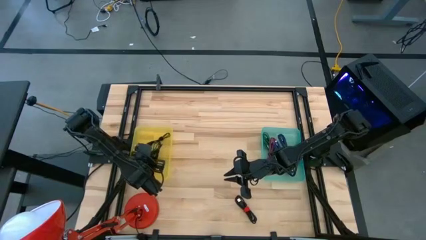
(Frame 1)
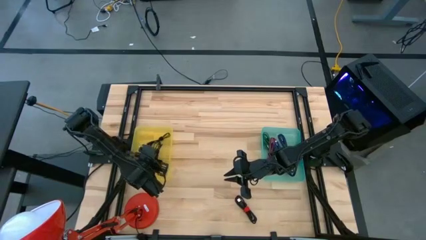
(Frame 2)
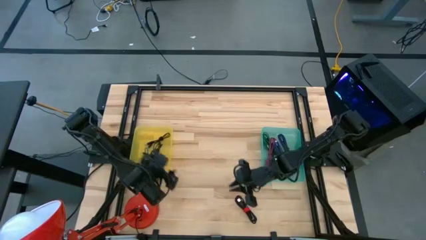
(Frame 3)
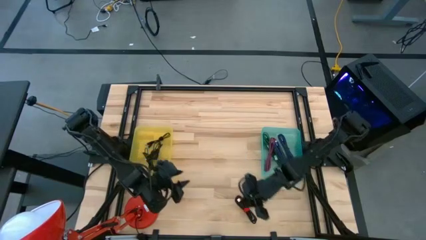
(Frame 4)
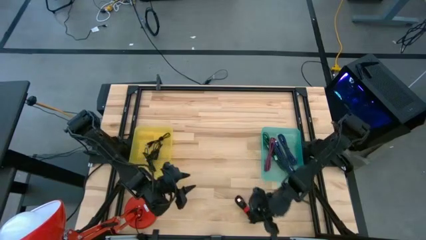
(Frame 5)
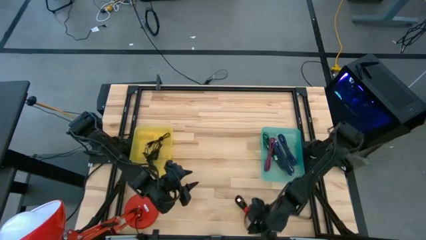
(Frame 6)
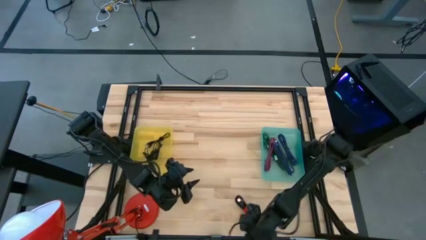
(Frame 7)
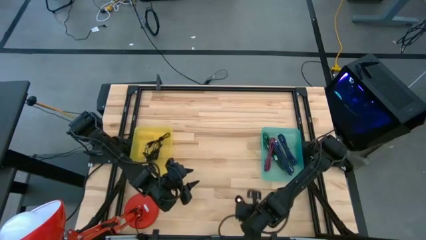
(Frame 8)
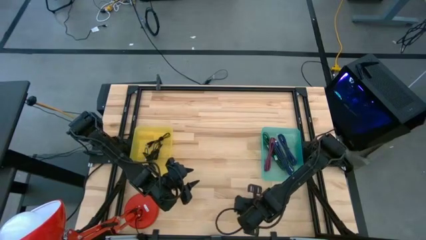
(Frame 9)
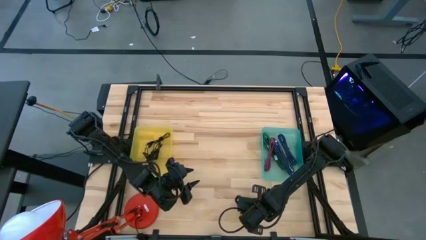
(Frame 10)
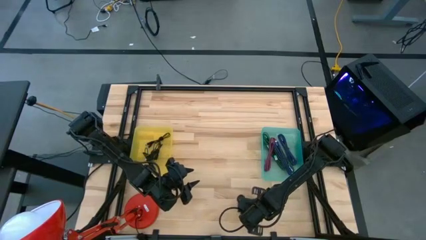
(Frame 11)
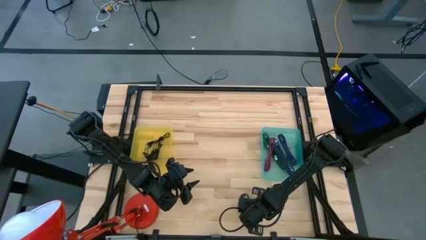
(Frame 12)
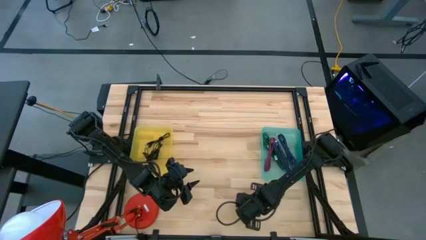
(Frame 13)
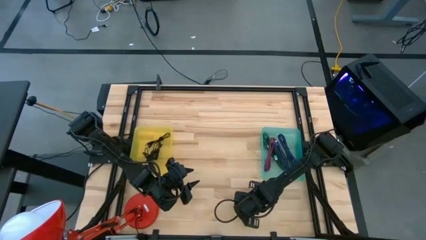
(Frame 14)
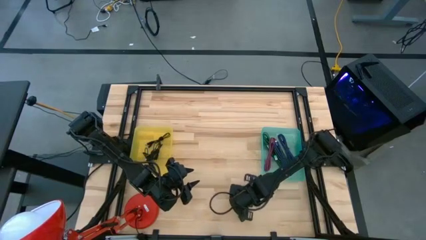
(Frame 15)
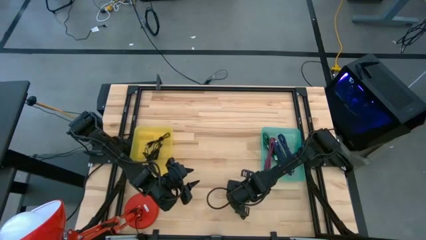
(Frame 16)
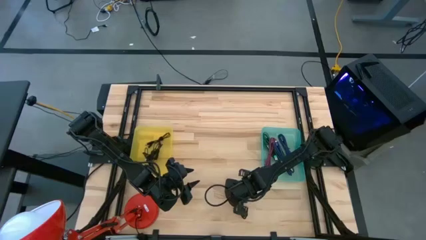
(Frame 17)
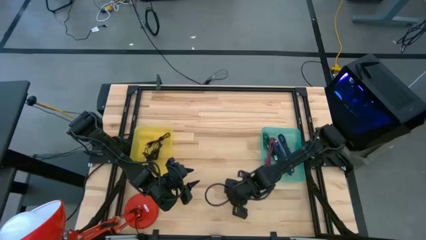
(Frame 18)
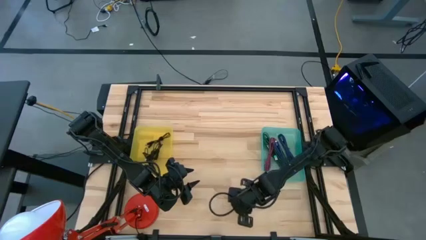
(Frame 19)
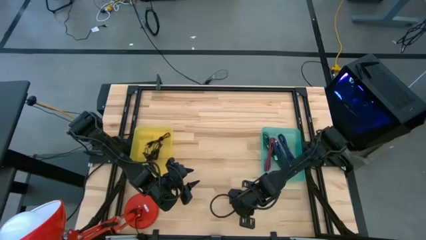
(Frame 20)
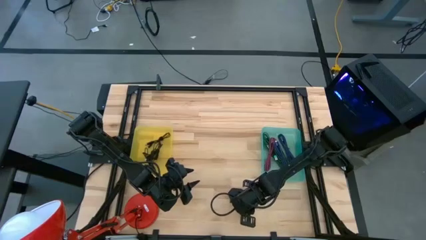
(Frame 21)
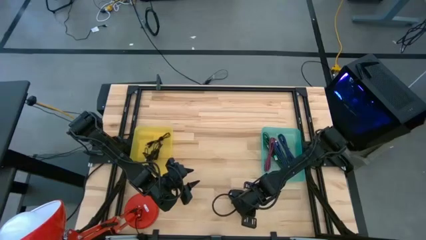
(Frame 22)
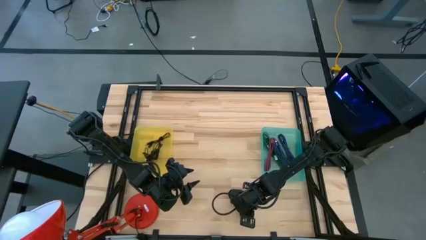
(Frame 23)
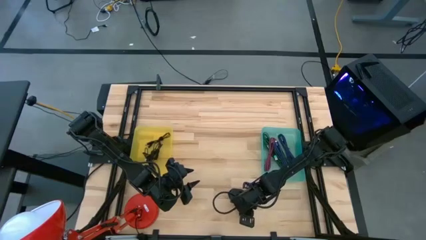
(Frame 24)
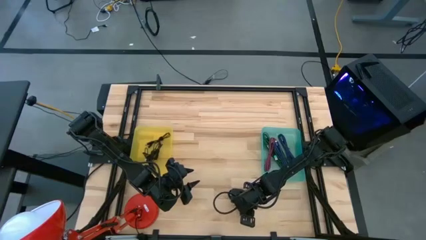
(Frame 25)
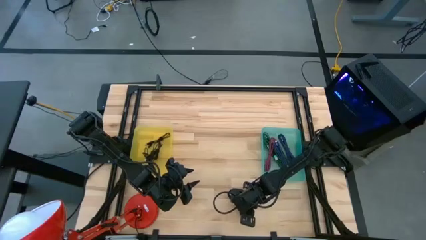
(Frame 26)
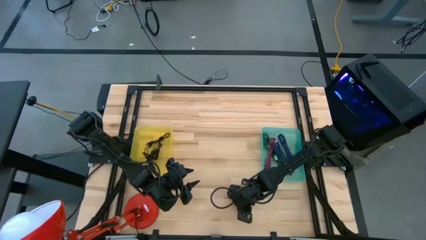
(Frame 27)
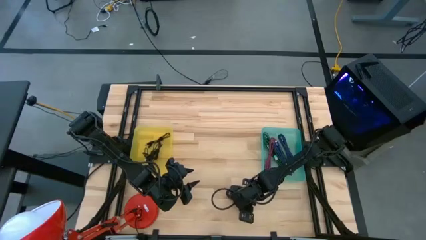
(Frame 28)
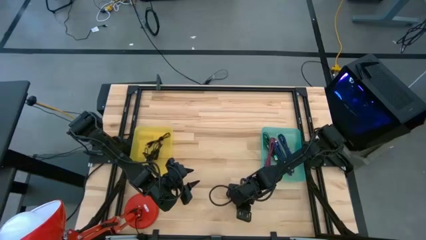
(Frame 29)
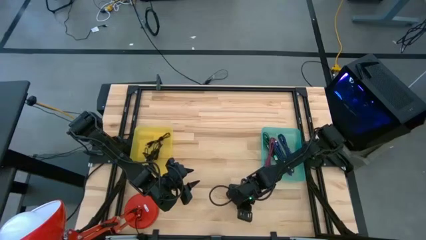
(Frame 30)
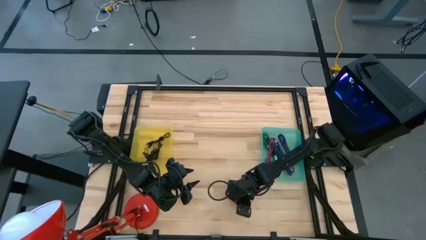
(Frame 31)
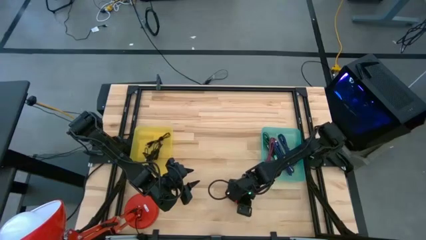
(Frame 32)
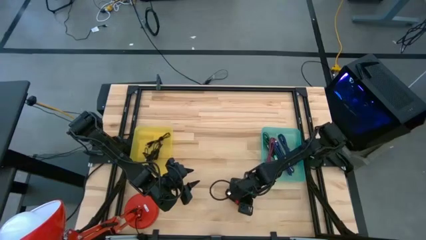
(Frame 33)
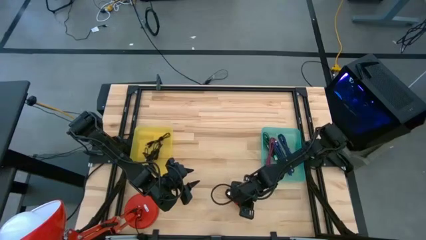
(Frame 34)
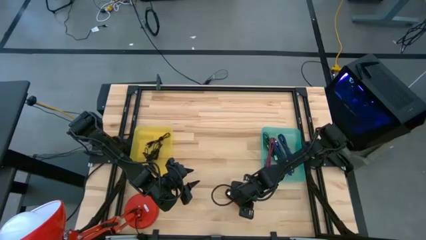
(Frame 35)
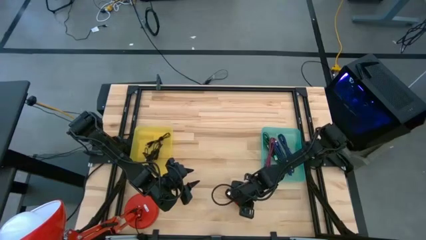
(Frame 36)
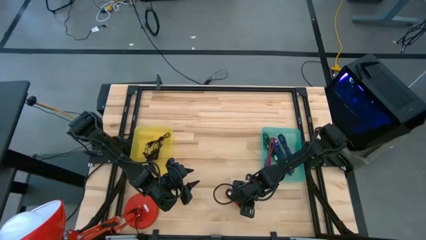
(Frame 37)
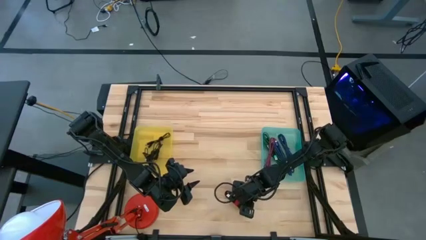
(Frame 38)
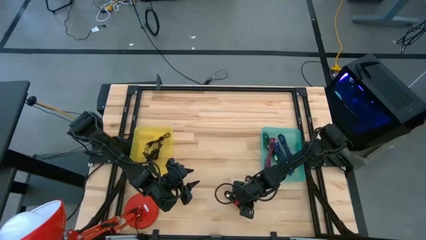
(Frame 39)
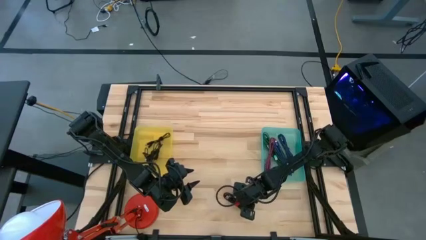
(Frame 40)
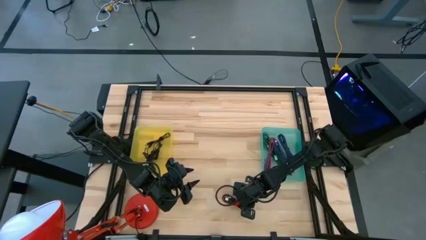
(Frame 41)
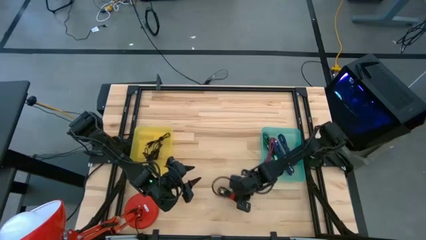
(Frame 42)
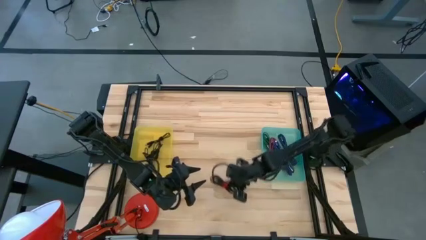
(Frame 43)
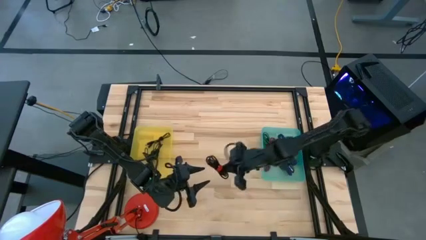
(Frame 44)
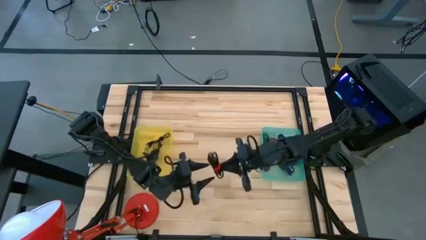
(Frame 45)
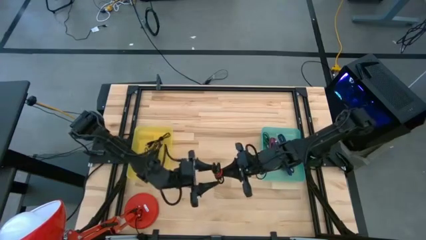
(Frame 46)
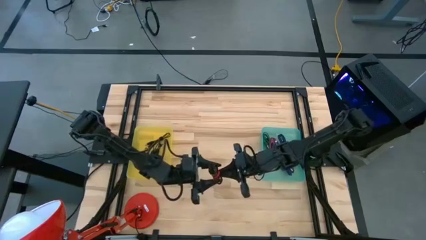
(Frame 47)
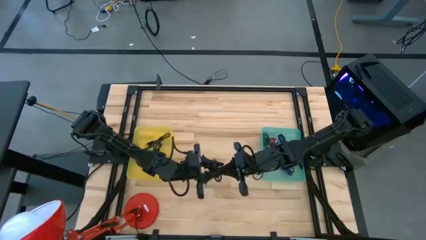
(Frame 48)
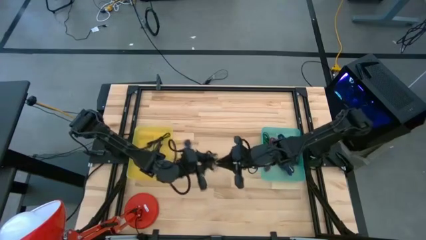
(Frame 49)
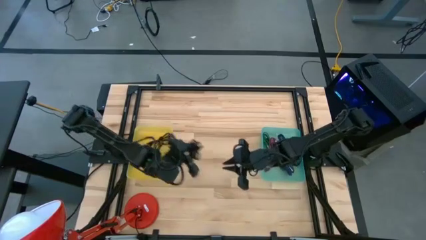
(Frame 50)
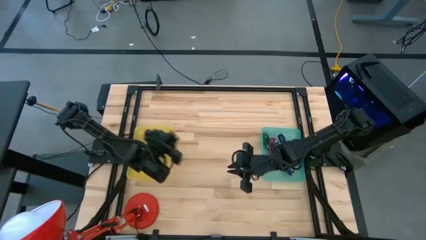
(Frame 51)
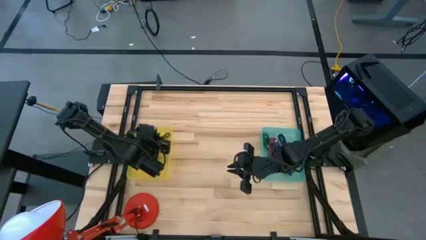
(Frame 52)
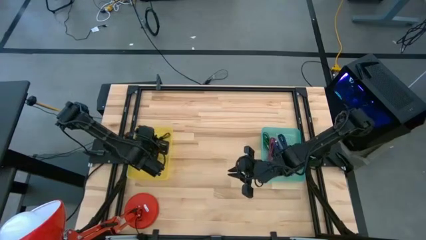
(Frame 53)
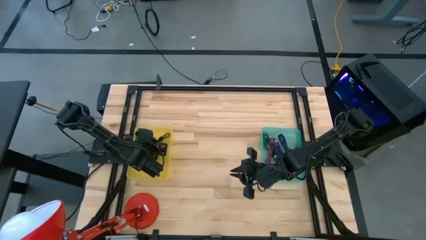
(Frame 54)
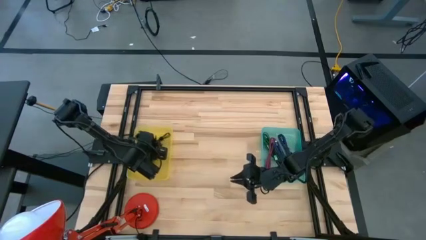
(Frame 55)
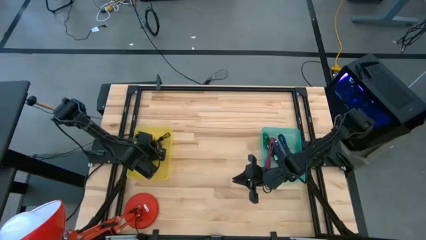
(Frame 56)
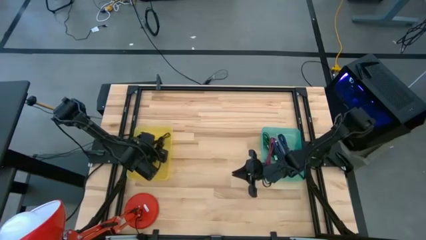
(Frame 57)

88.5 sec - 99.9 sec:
Task: Pick & Place USB Port
Put the black charger cable into the yellow bin

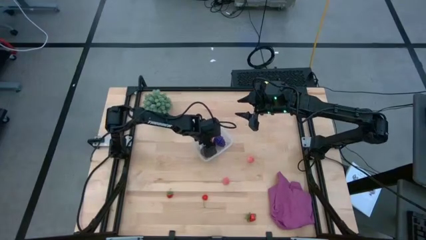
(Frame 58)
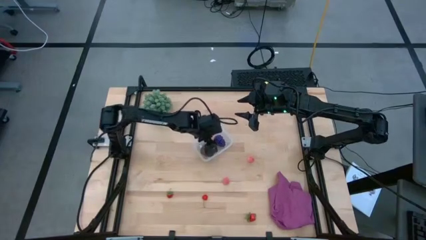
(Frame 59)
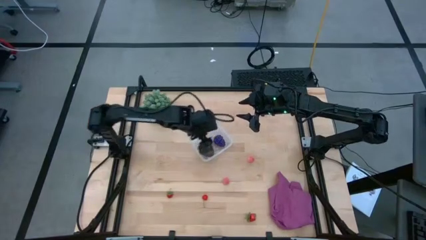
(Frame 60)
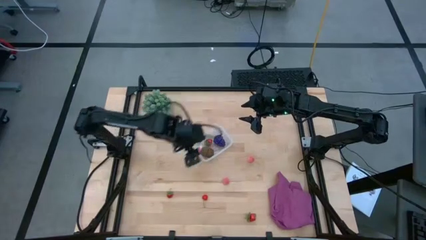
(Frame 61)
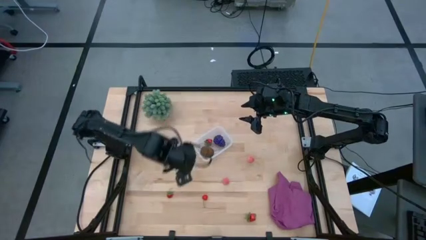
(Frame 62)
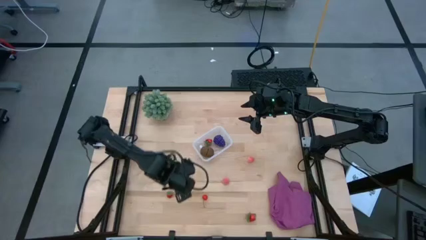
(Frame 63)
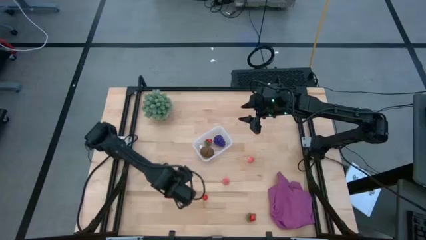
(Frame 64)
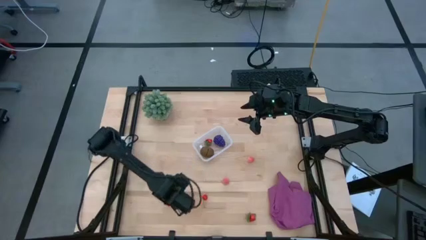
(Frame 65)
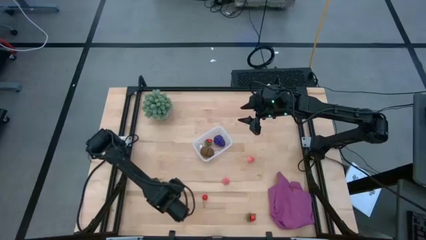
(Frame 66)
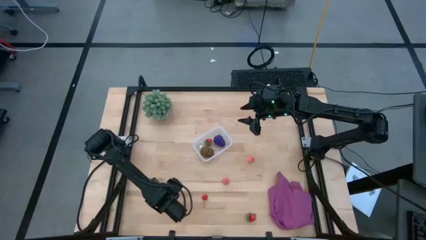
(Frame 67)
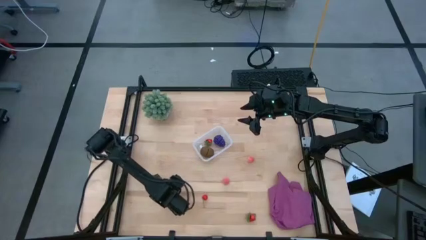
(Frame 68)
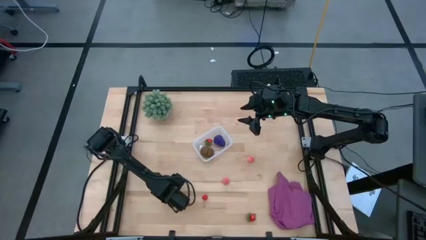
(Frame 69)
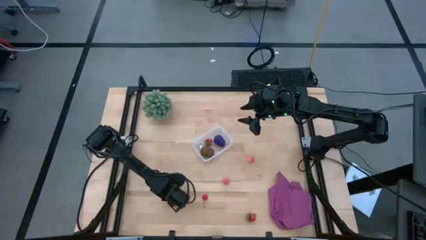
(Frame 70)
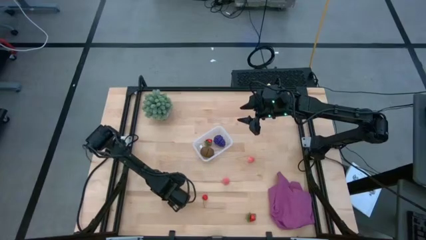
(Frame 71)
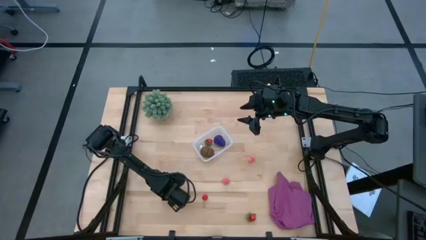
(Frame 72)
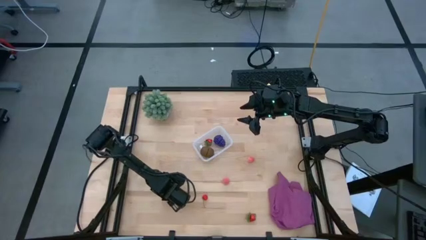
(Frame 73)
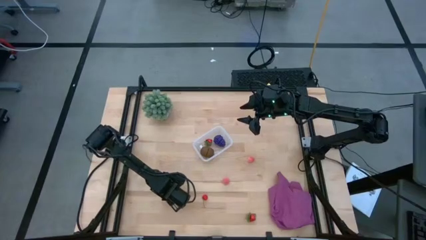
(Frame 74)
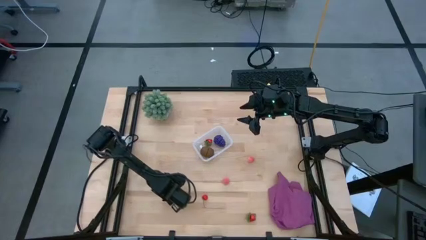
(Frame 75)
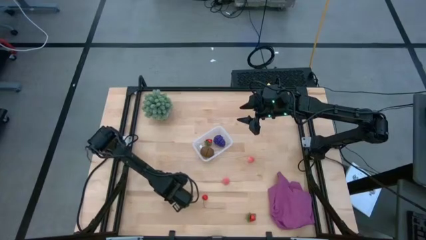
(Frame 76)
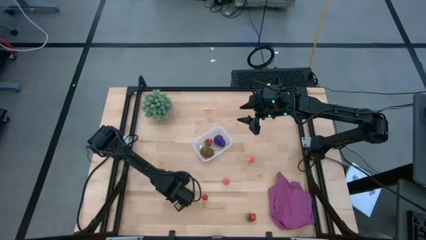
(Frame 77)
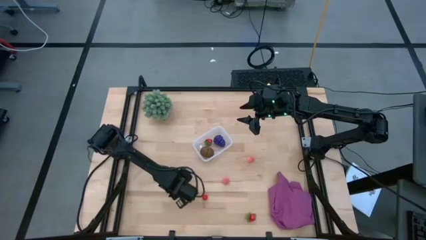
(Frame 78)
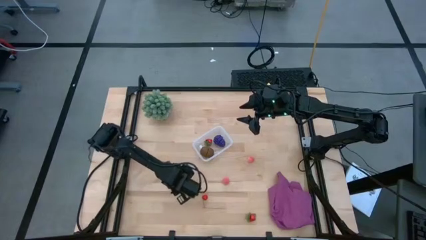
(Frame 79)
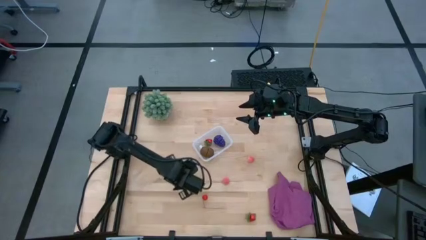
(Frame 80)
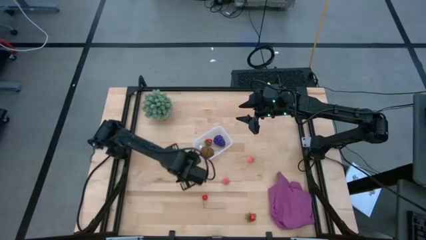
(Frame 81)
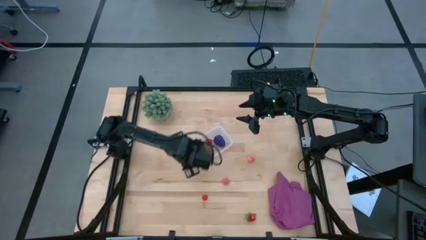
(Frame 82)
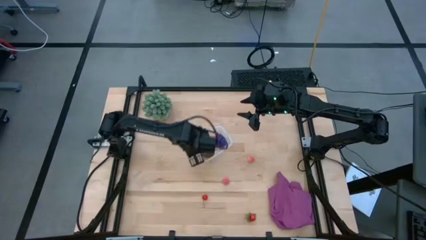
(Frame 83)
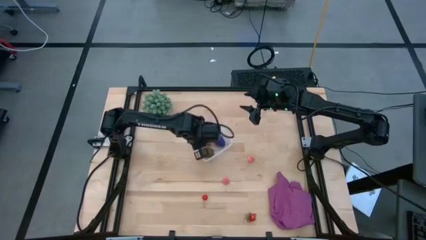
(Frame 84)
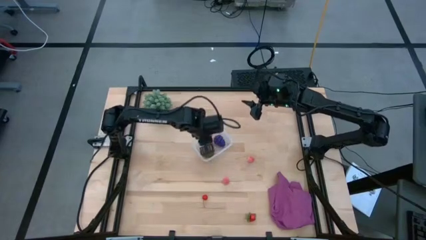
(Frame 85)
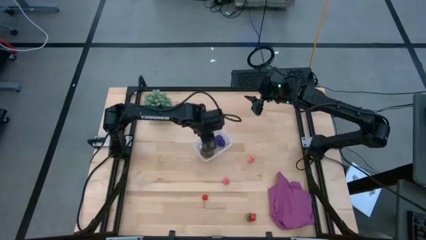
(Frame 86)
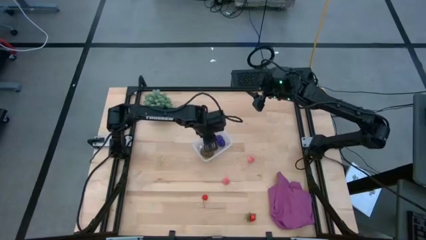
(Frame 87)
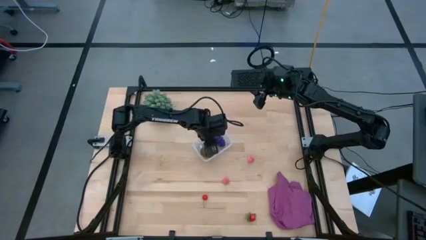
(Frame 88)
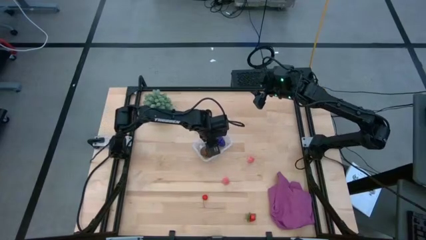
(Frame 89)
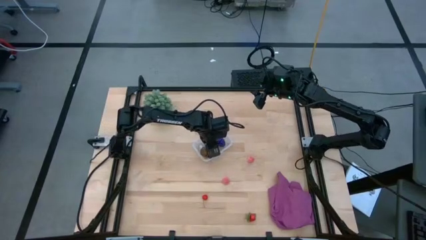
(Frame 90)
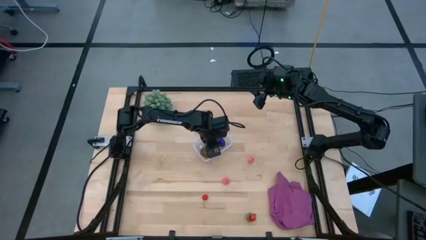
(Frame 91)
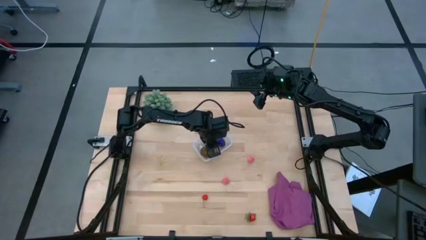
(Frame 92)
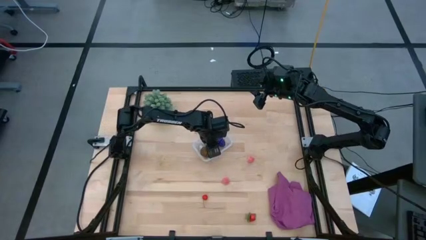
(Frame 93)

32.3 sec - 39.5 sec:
Task: Pick and placing Produce into tupperware
Put the left strawberry into the transparent bin
